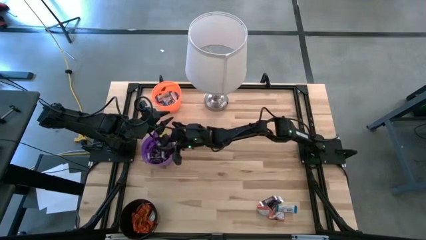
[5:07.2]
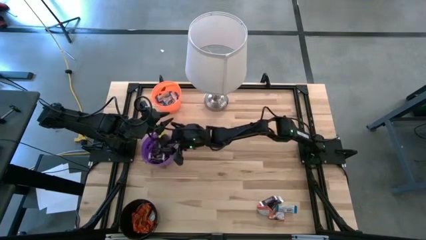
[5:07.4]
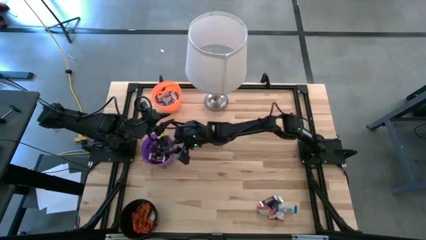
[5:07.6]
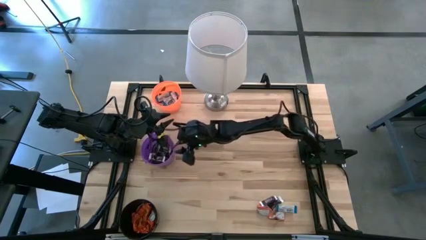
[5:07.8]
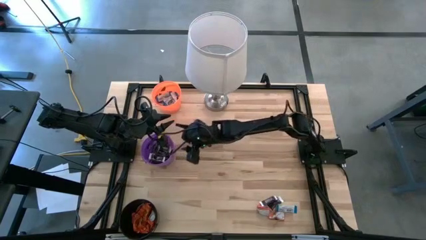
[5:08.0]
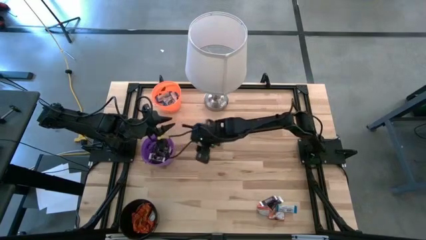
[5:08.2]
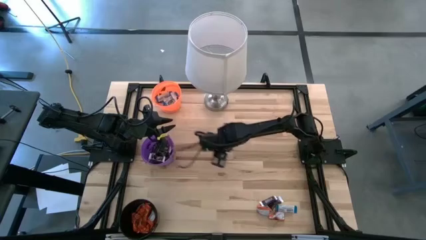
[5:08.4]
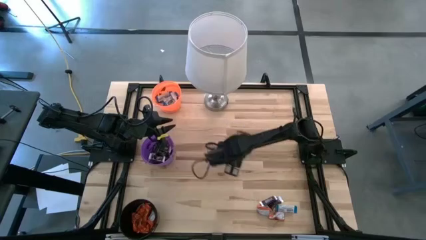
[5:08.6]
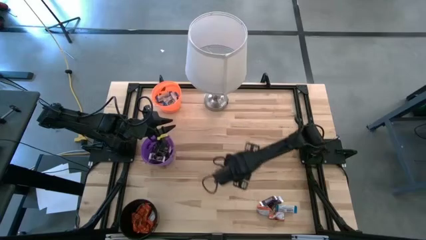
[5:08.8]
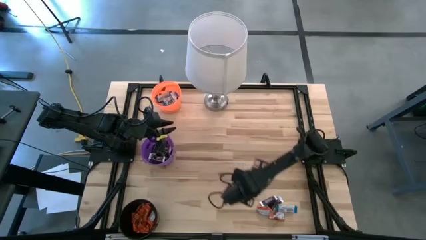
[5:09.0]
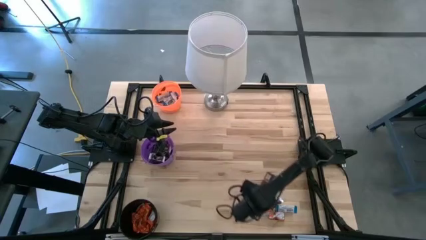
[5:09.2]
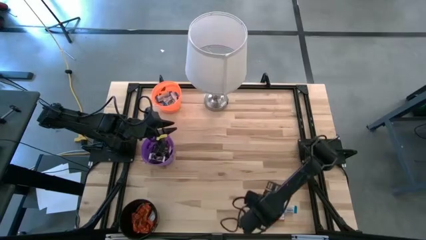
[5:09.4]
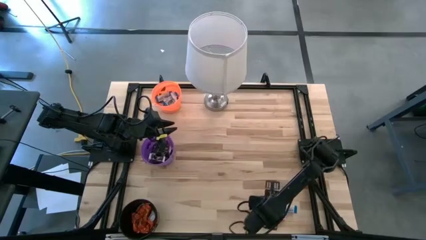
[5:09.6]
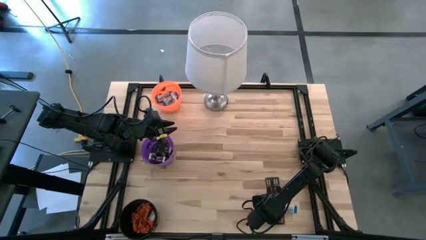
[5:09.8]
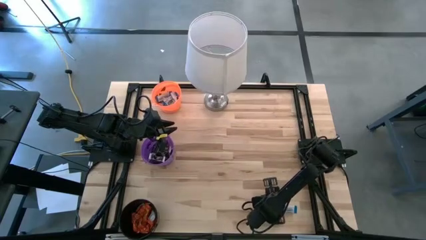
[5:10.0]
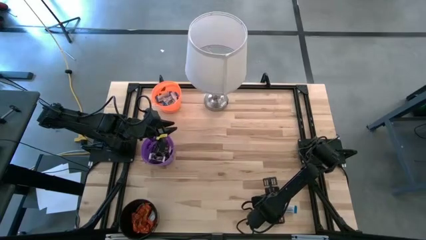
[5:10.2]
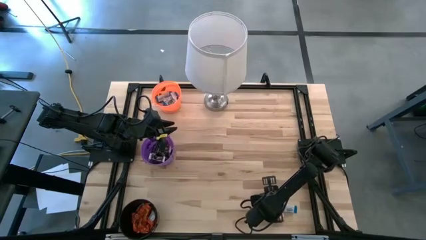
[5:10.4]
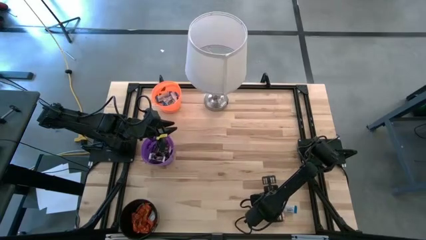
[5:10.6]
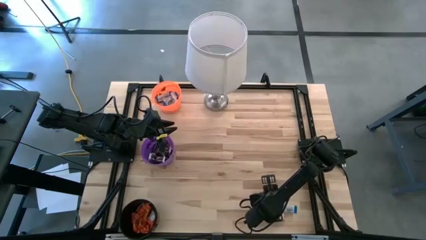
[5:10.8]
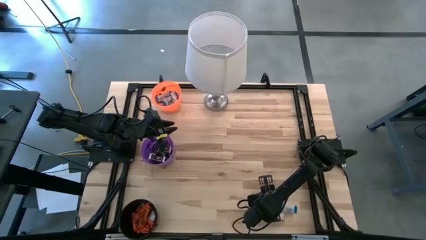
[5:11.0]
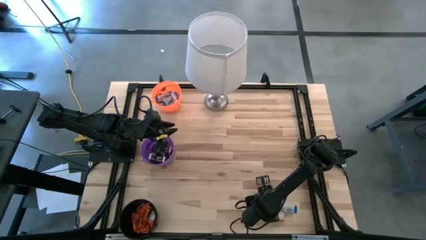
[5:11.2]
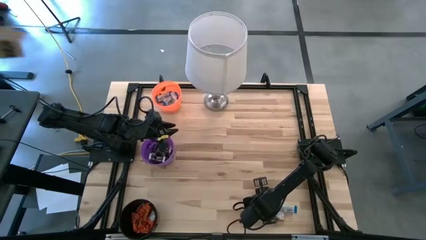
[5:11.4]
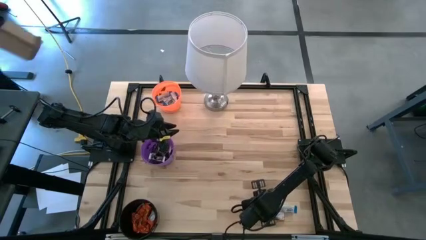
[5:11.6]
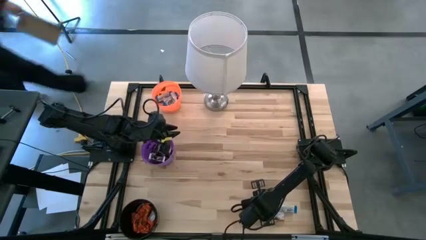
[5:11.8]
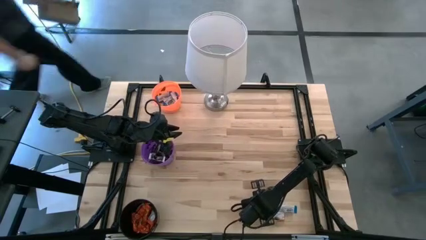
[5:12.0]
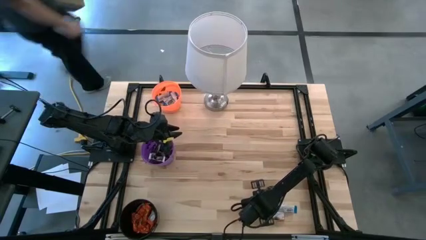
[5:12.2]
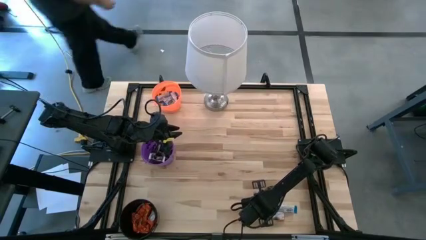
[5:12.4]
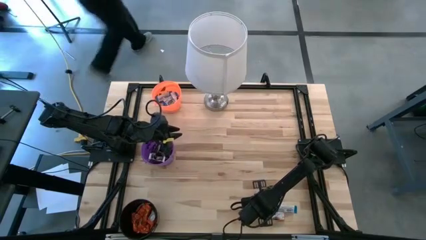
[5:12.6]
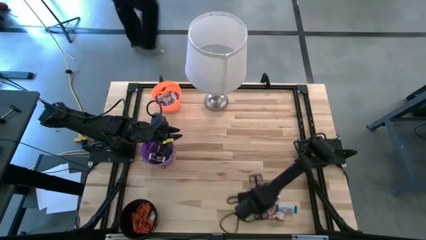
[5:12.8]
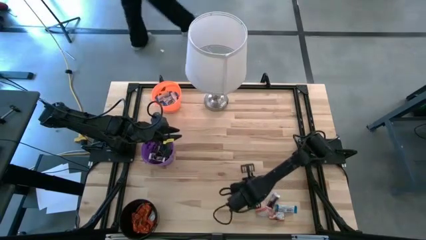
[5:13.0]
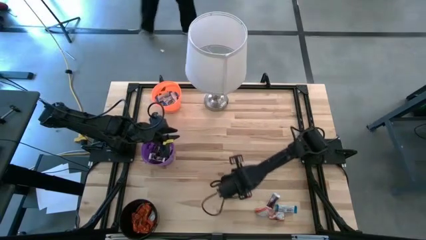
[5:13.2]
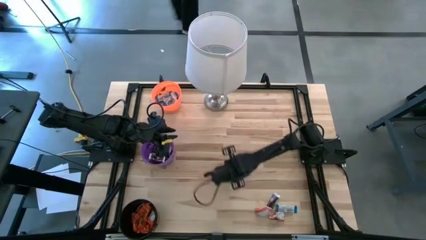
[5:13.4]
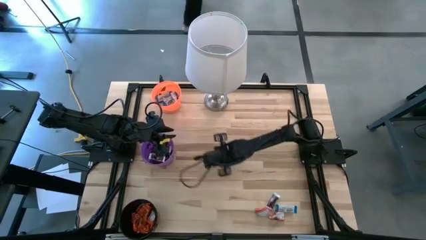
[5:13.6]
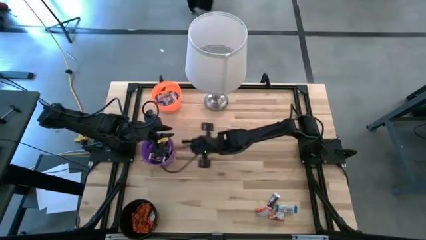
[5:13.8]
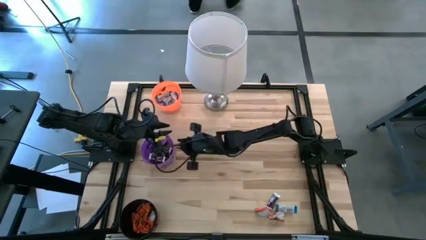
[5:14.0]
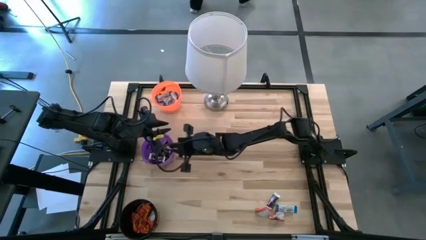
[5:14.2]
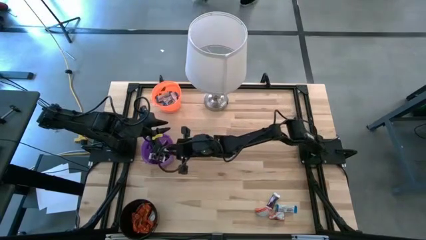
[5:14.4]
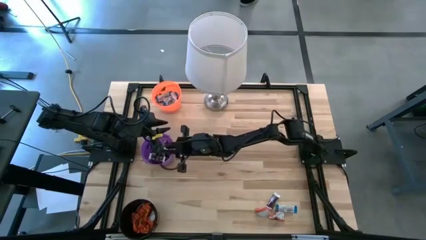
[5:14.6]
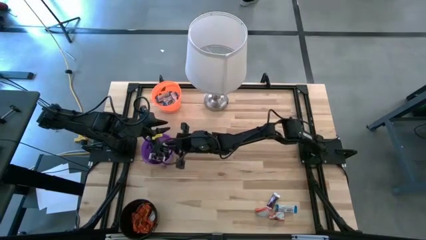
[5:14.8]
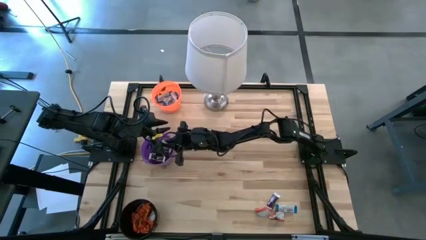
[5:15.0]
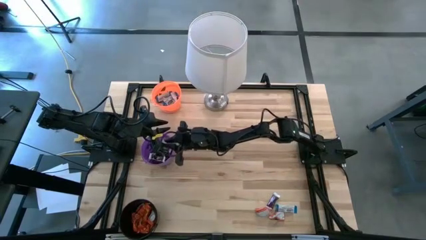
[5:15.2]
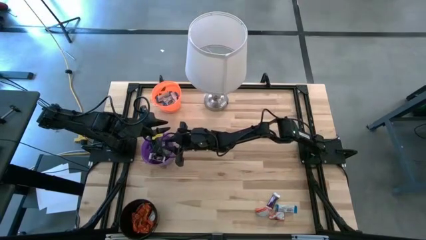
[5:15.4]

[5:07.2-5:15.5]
Task: Sort candy
Put the brown chocolate into the purple bucket

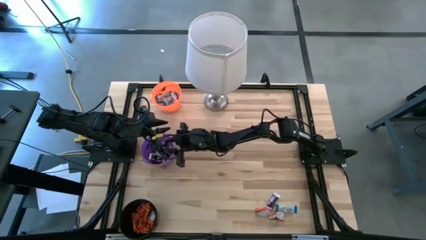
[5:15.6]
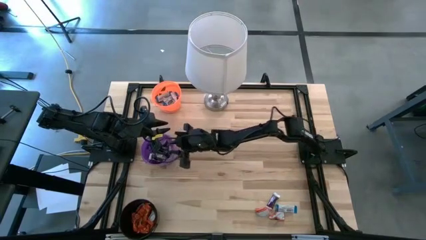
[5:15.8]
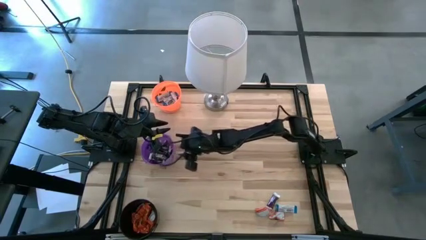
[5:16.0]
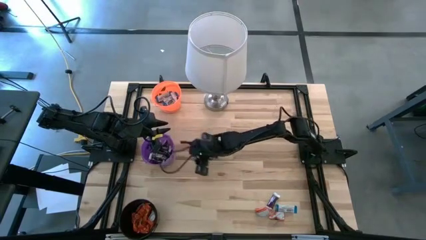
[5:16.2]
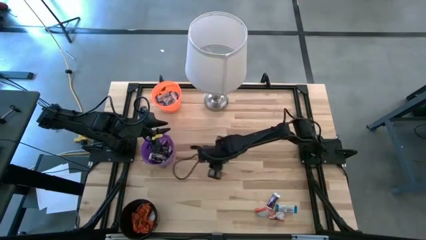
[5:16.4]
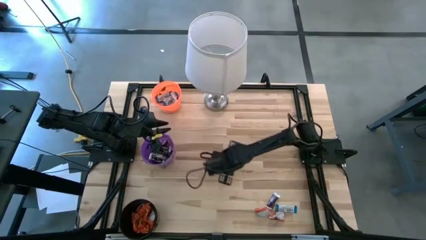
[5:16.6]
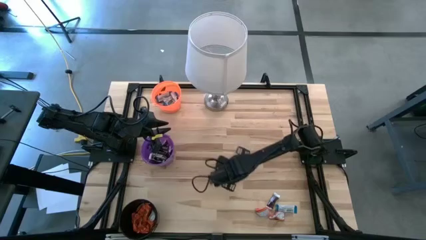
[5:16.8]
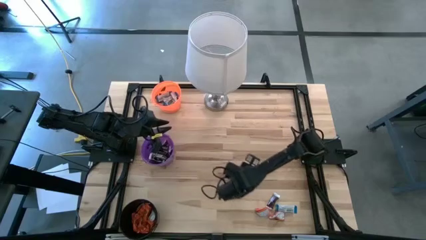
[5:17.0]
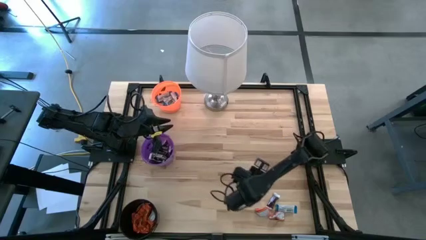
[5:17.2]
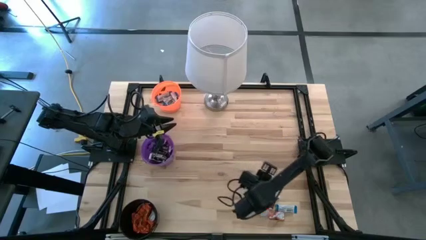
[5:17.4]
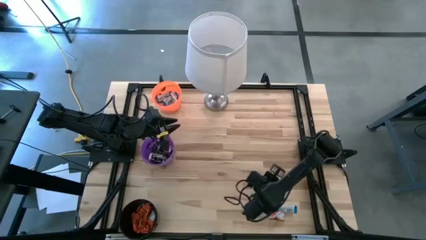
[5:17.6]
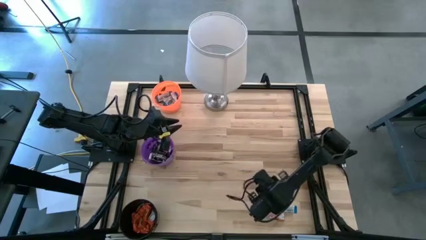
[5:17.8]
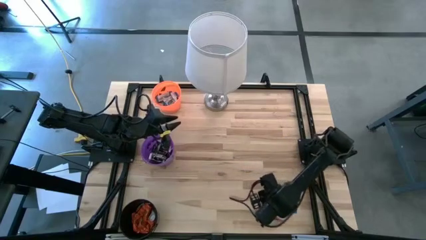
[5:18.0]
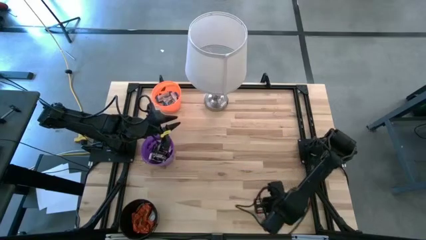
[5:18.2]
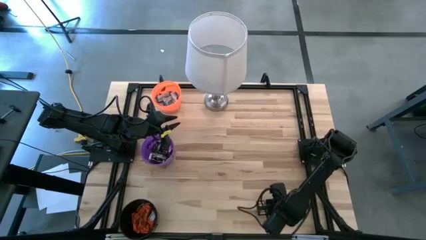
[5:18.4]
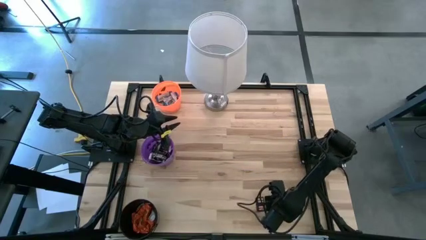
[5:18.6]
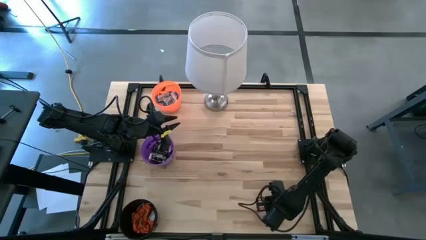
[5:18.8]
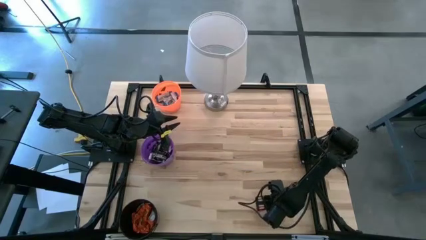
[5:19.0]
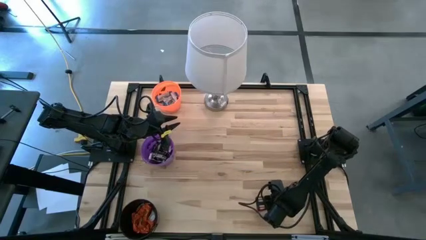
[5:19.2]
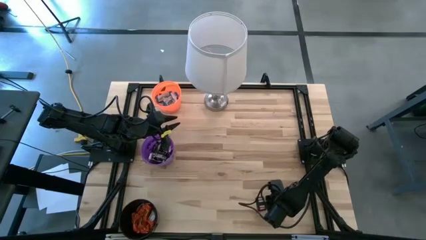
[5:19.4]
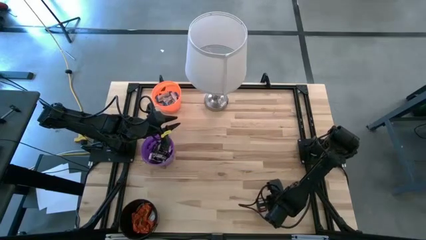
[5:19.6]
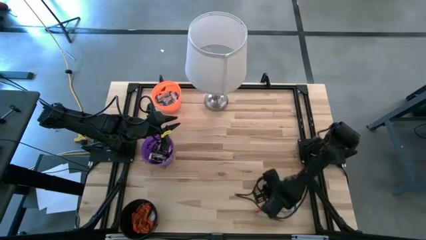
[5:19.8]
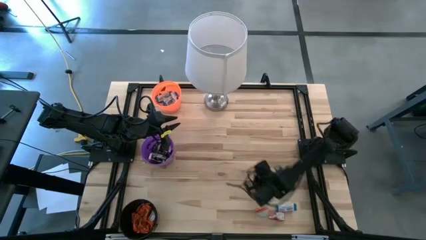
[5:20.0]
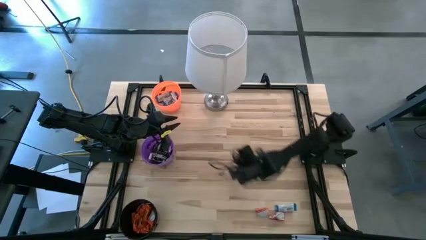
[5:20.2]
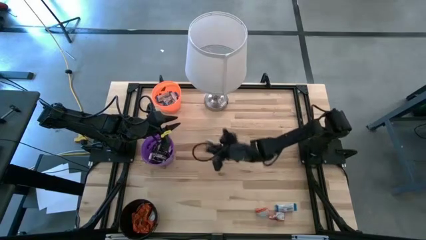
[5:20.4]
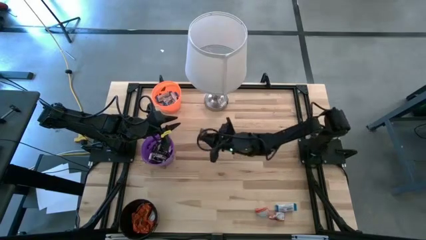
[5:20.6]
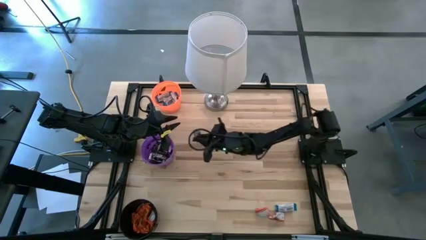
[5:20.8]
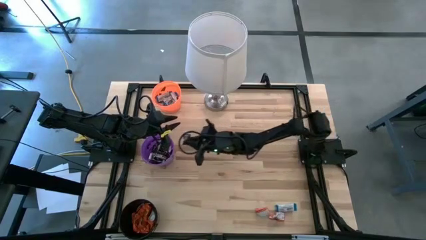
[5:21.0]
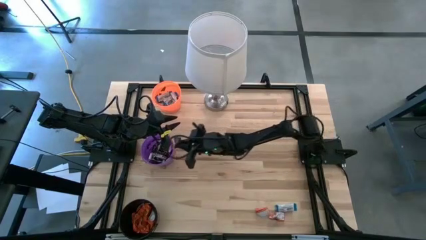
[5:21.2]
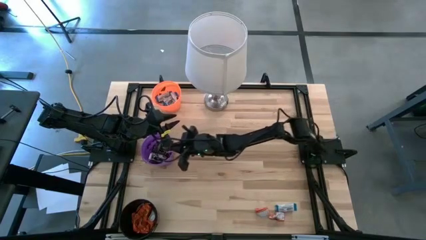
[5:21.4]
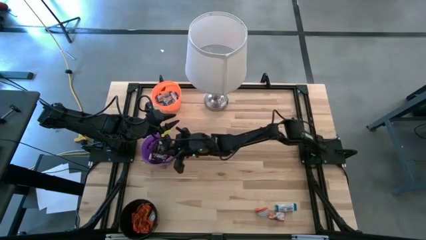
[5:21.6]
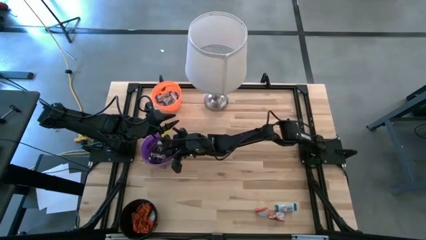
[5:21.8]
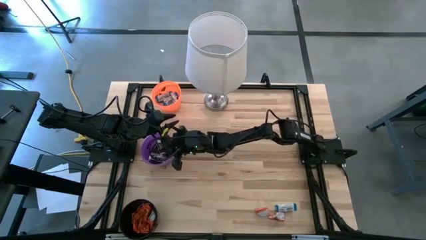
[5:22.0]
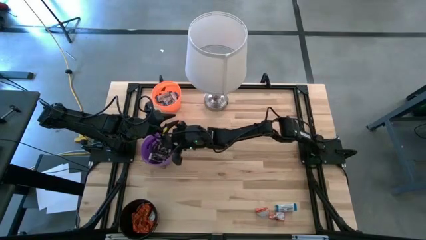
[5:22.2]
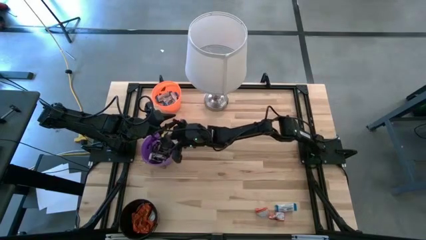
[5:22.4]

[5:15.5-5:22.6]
Put the brown chocolate into the purple bucket
